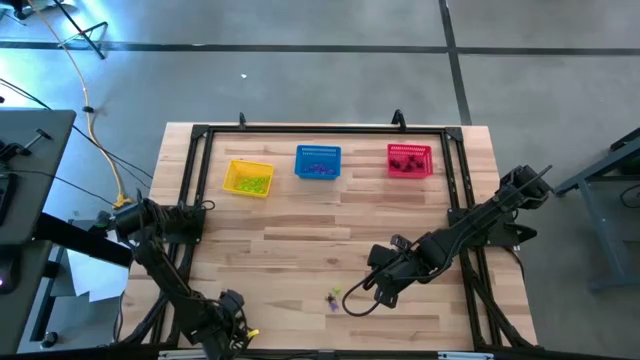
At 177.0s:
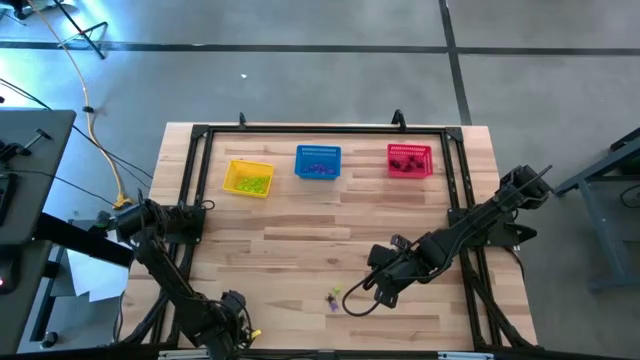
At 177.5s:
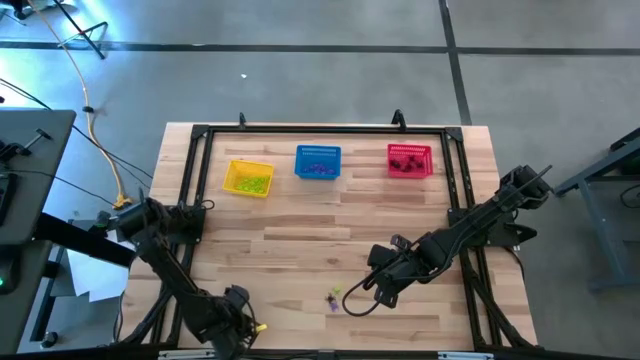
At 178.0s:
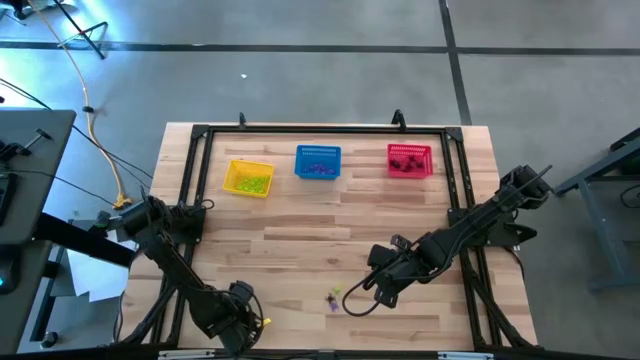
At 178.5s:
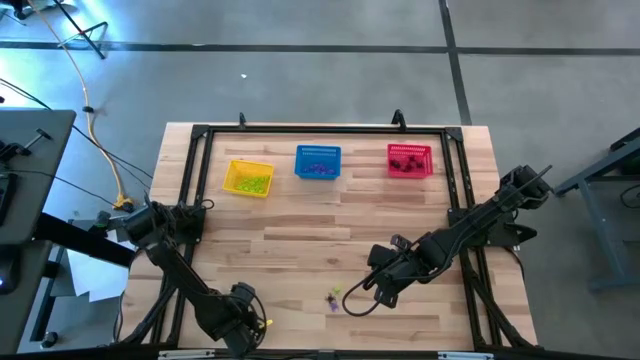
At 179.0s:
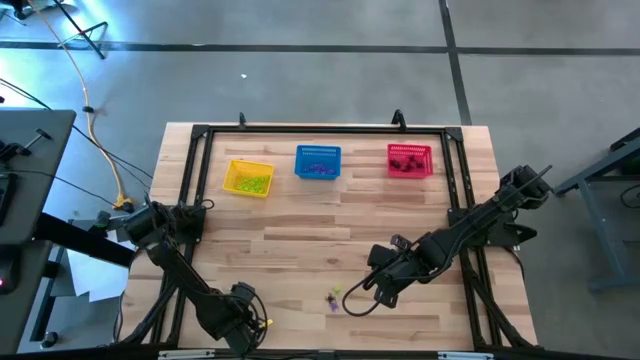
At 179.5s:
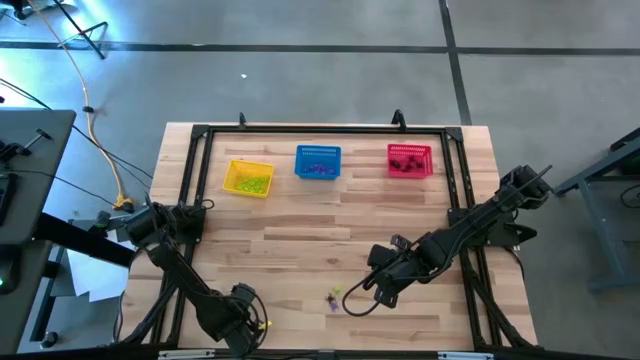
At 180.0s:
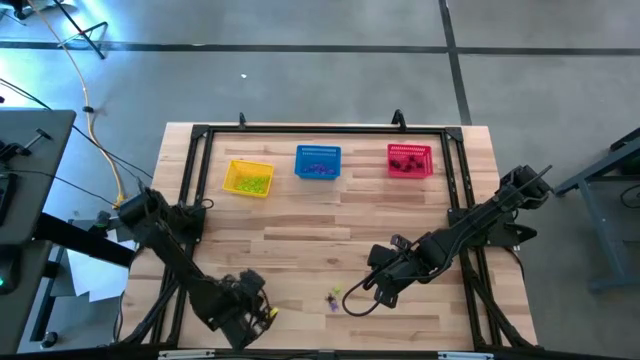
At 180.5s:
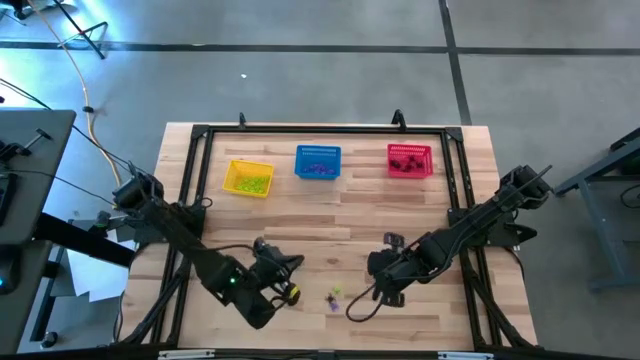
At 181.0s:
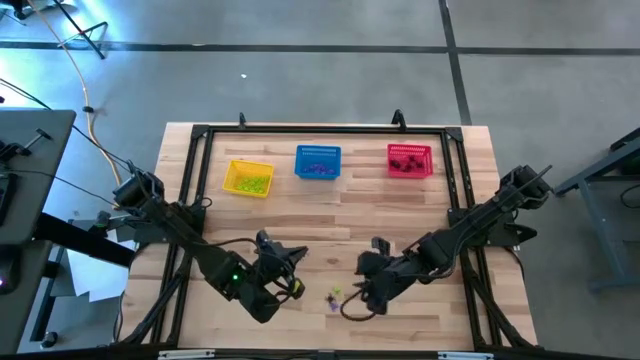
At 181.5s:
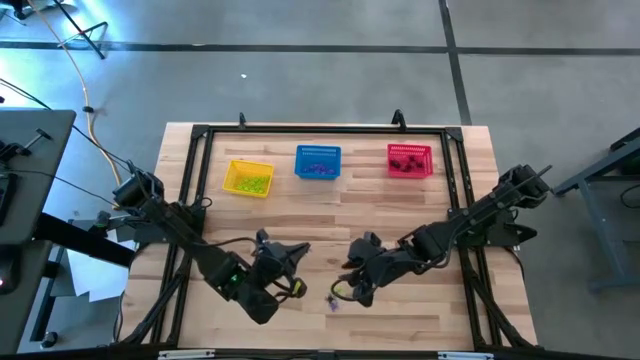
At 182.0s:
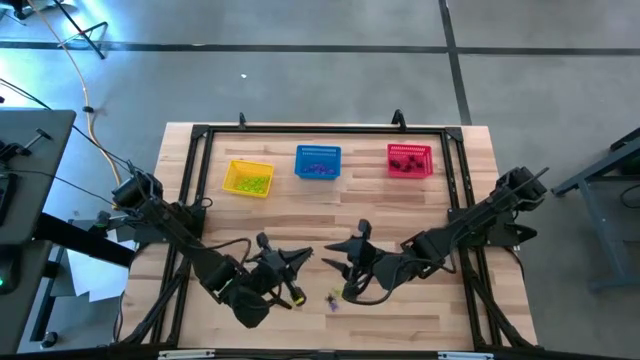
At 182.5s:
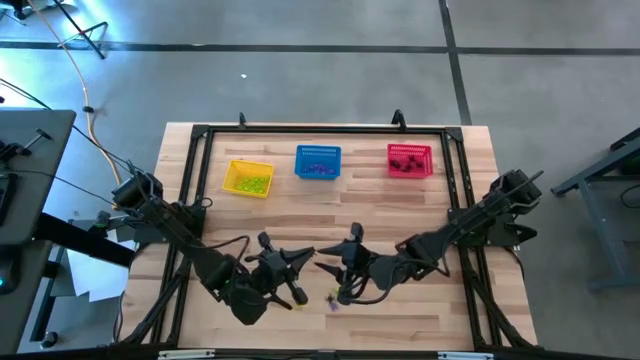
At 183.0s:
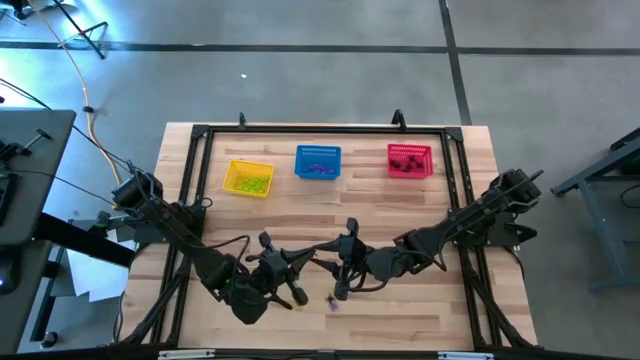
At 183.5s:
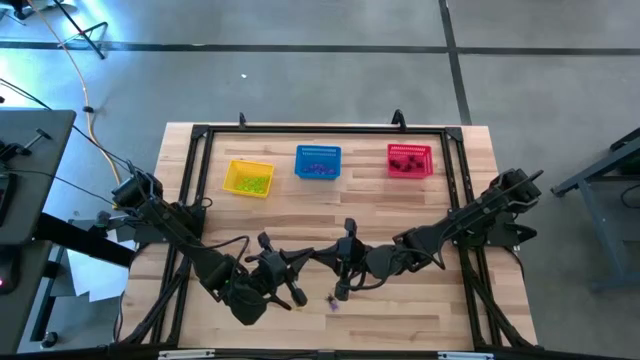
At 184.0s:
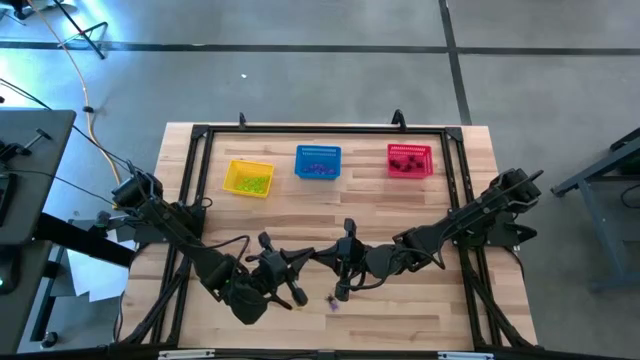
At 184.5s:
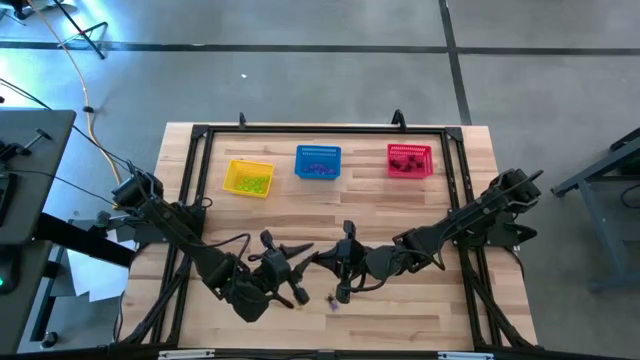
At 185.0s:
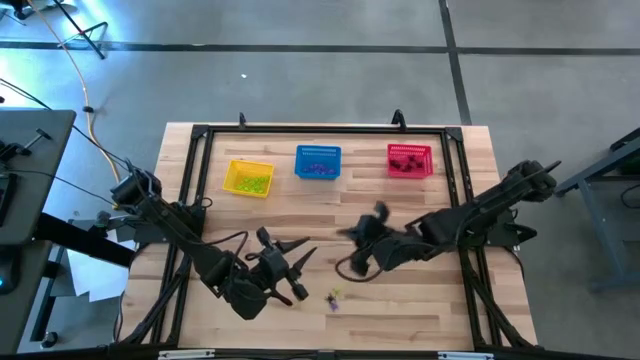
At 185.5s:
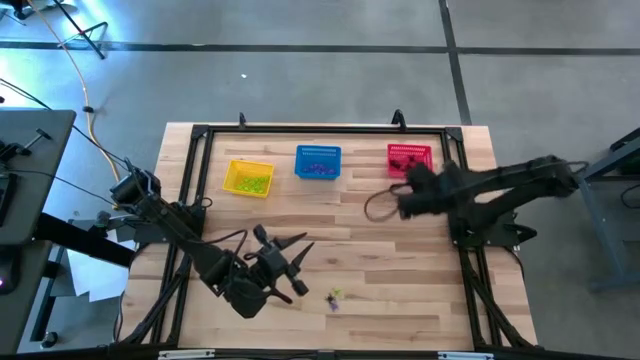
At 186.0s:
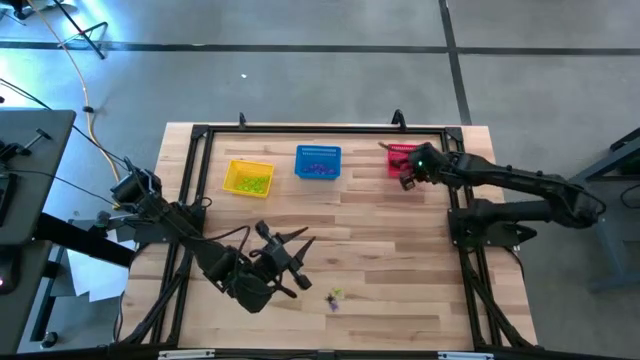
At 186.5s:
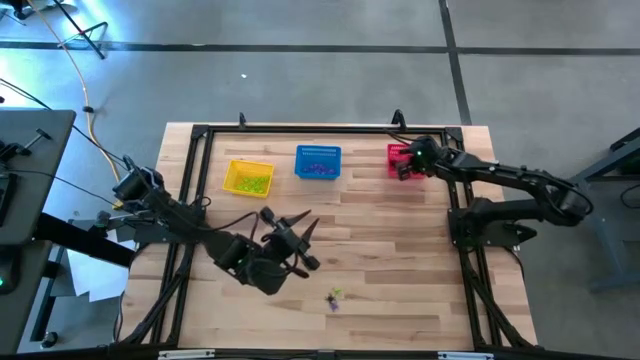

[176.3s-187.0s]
Task: Sort Halloween decoration
Put the black spider toy into the red bin

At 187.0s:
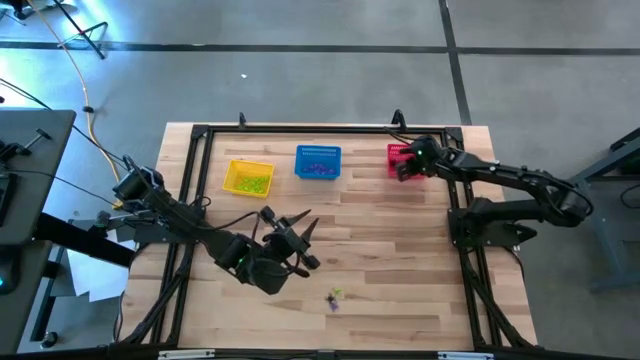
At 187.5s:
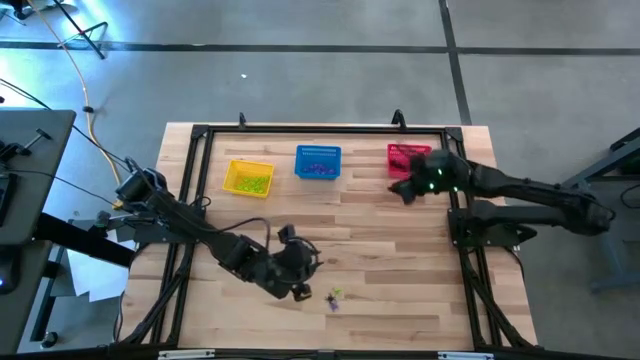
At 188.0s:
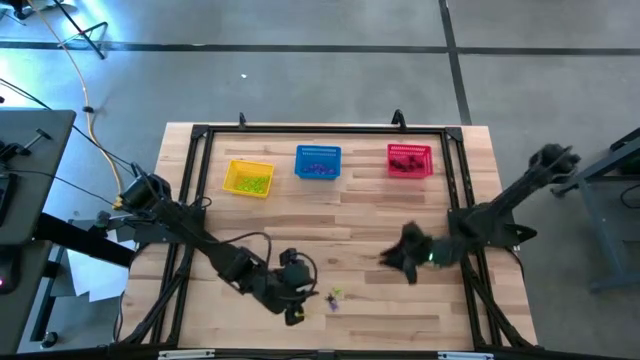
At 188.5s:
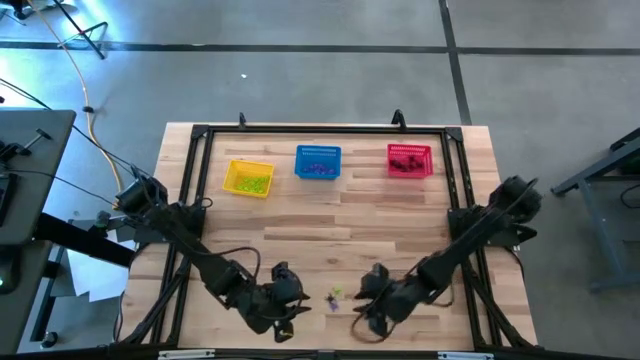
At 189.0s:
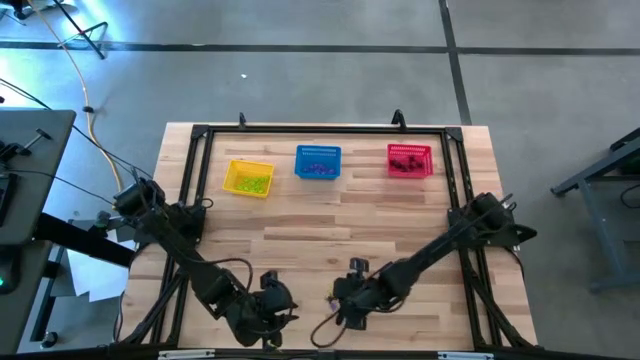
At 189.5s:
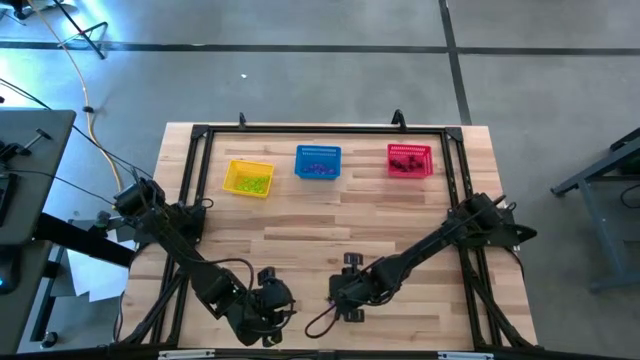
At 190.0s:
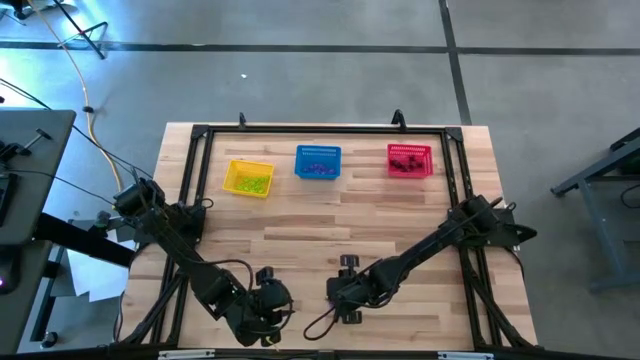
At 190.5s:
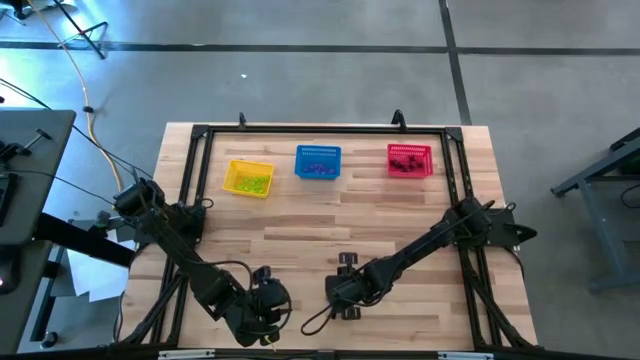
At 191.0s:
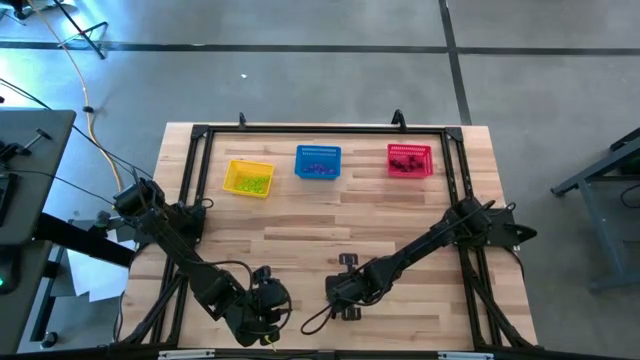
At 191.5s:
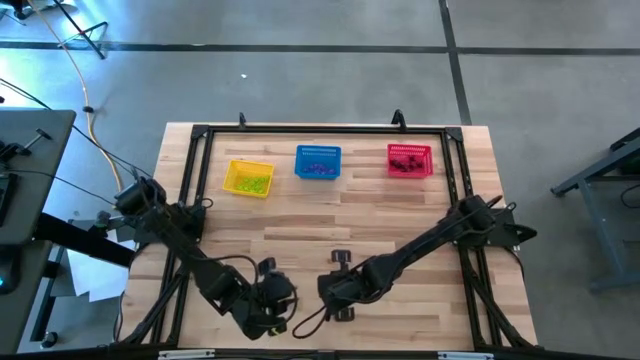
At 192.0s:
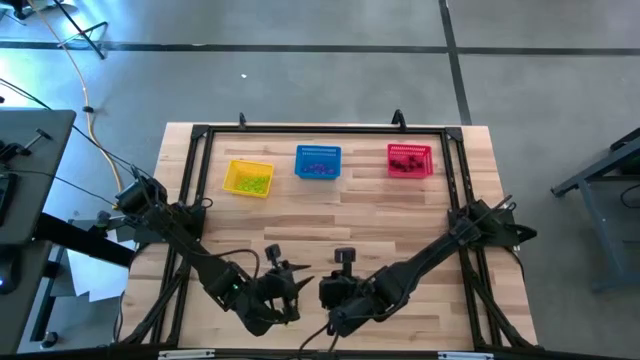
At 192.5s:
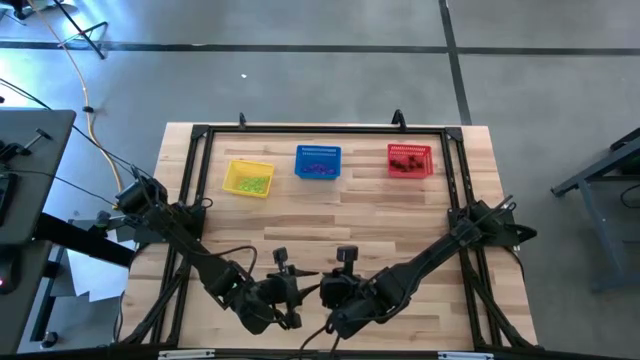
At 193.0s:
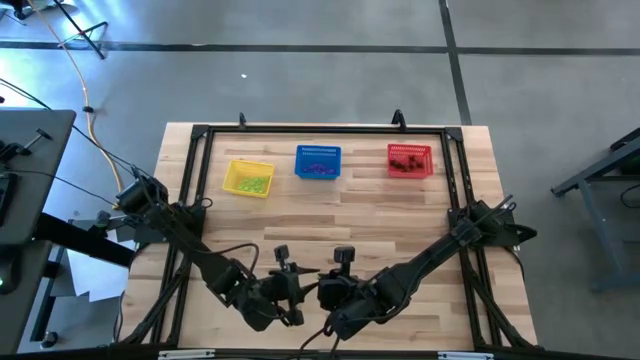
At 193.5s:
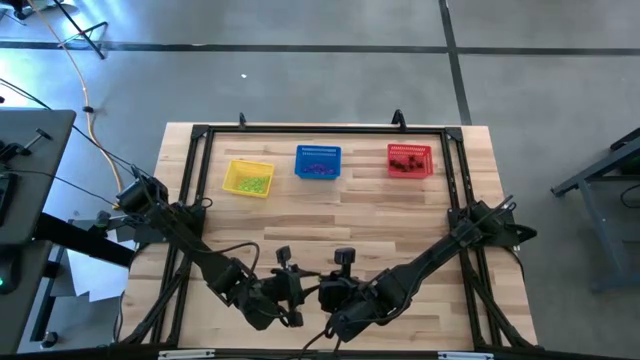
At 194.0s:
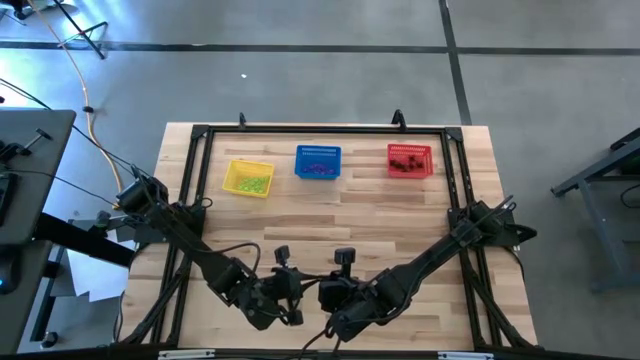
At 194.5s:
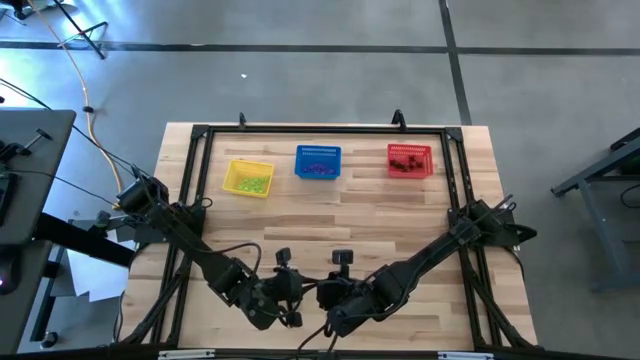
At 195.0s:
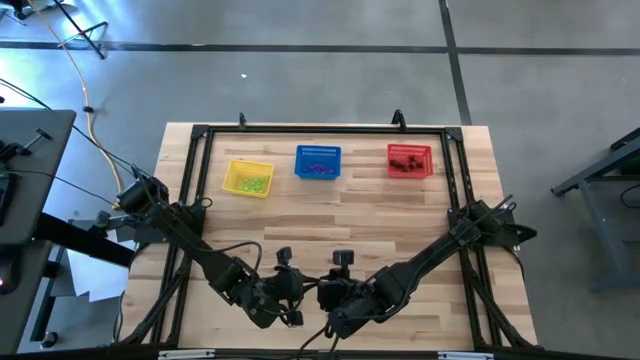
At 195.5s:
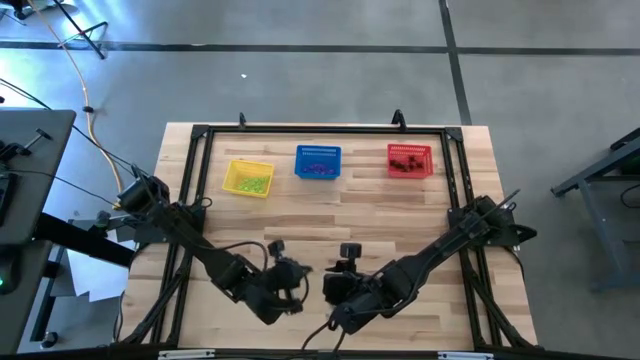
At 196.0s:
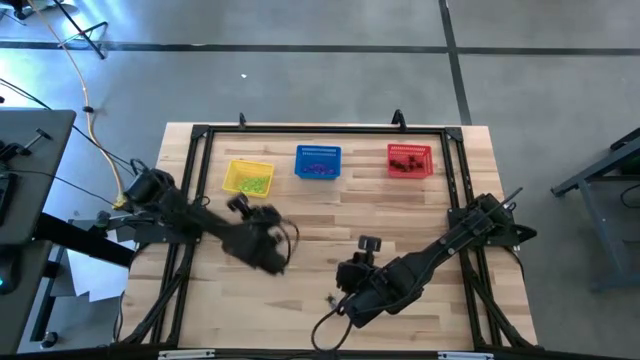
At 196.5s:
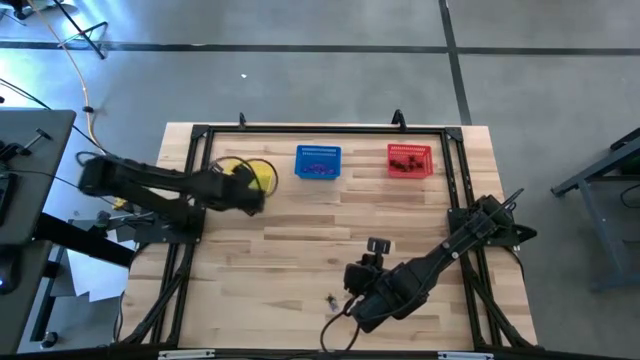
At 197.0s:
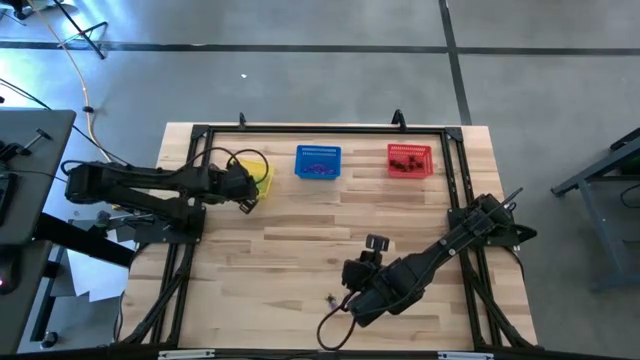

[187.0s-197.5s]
Put the green spider toy into the yellow bin
